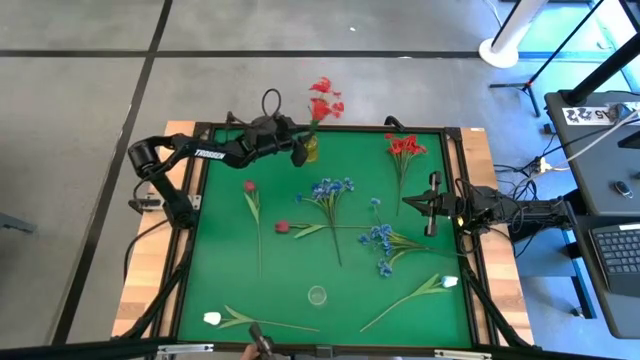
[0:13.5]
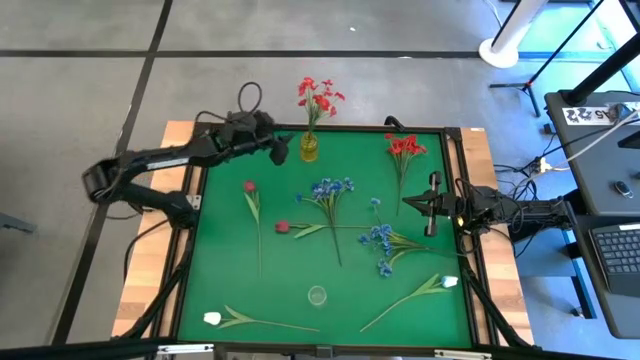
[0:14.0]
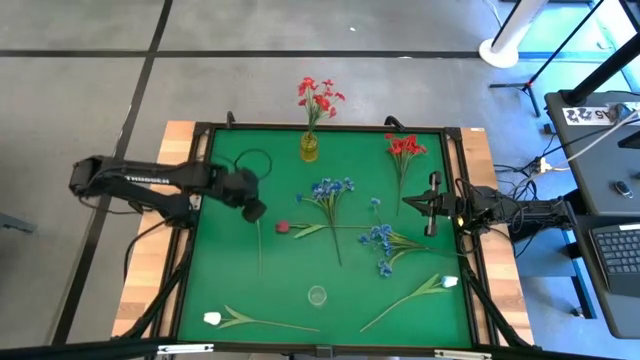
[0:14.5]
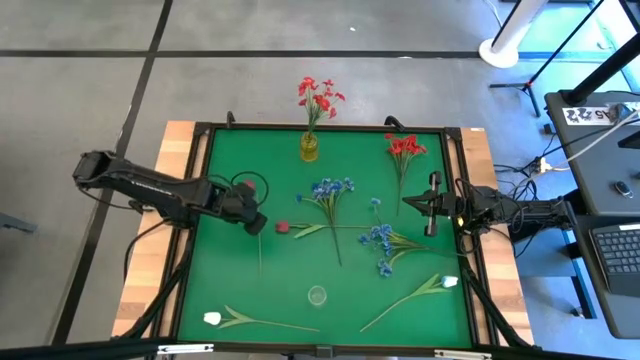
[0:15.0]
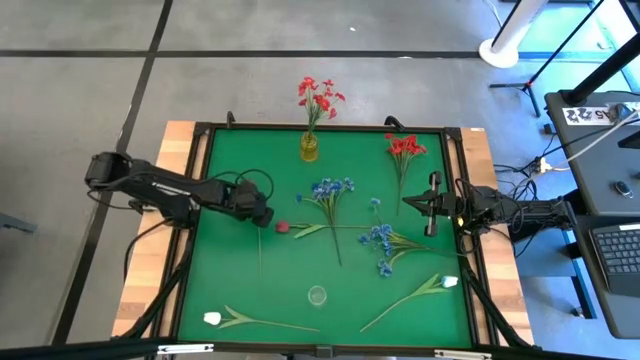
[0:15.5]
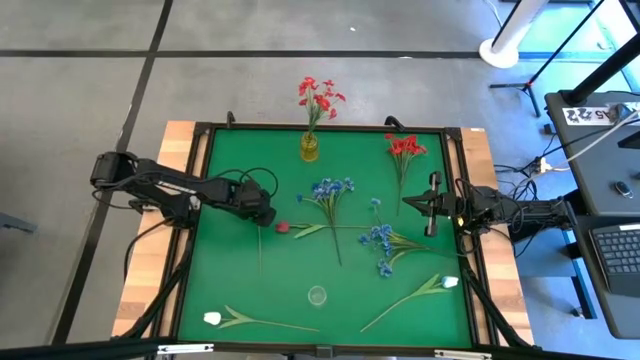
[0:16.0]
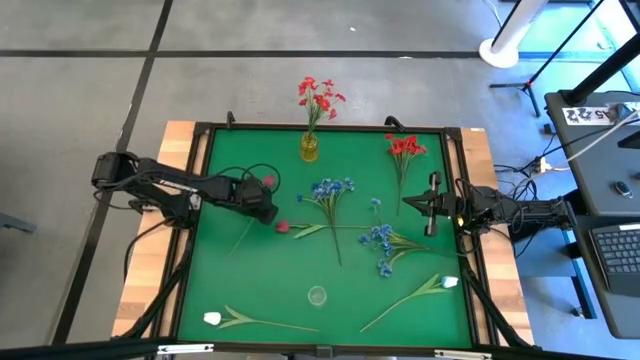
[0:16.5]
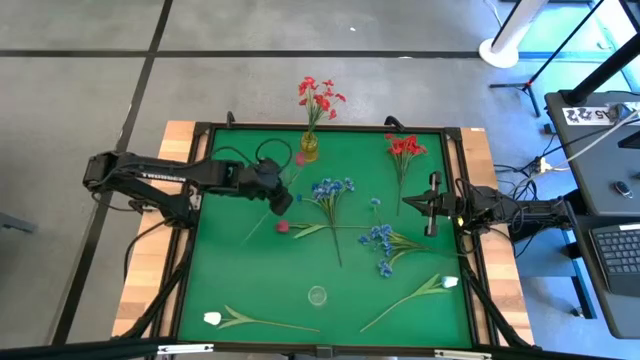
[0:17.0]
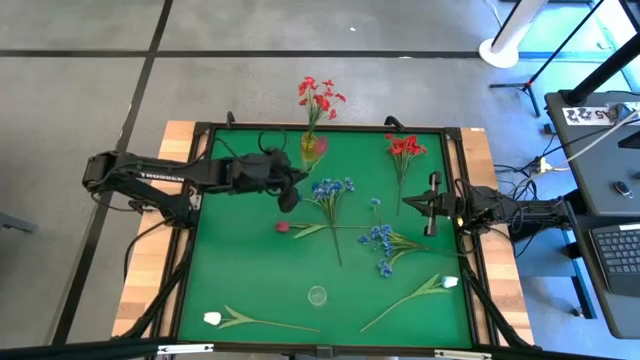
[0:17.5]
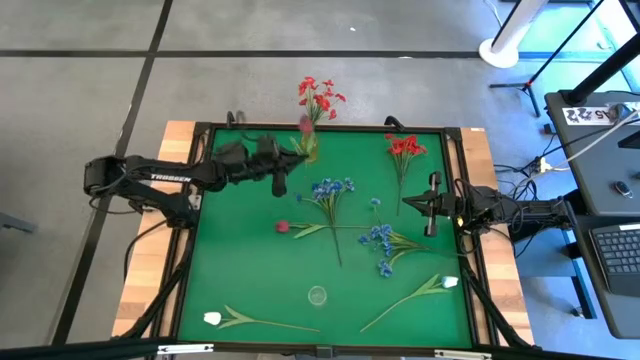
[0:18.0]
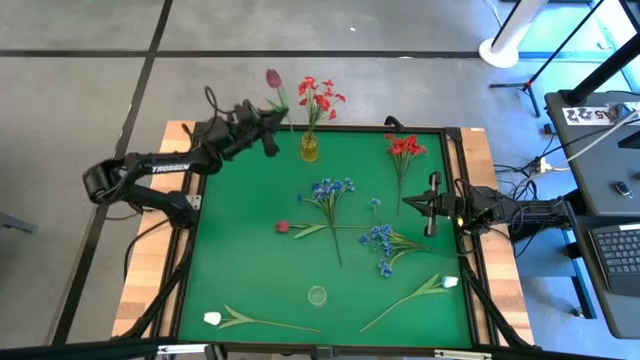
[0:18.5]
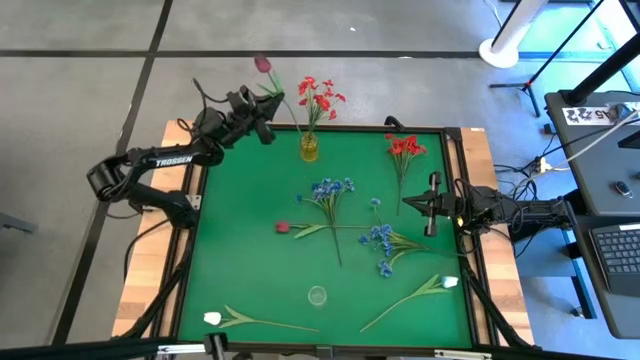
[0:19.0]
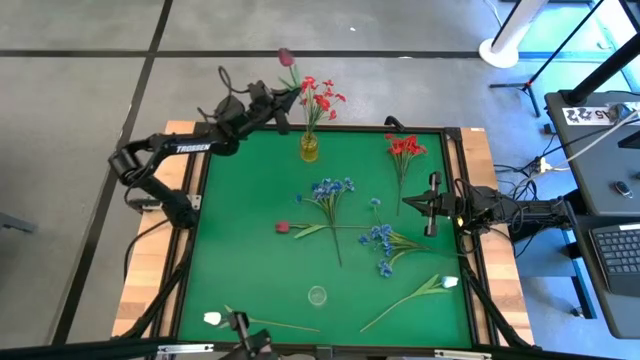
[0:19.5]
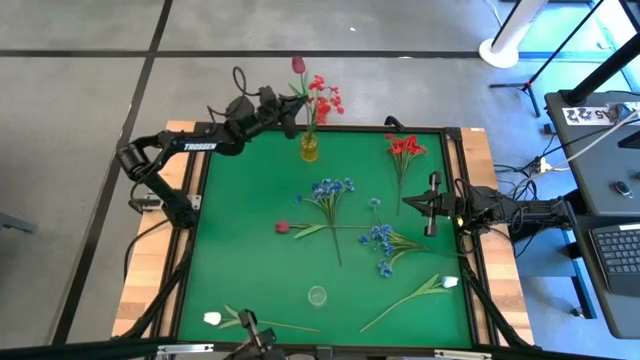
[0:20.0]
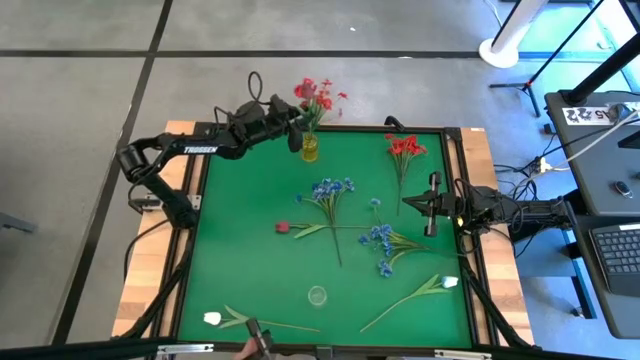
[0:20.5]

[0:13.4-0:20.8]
Task: Sort flowers into vase by color
Put the left red tulip into the yellow vase

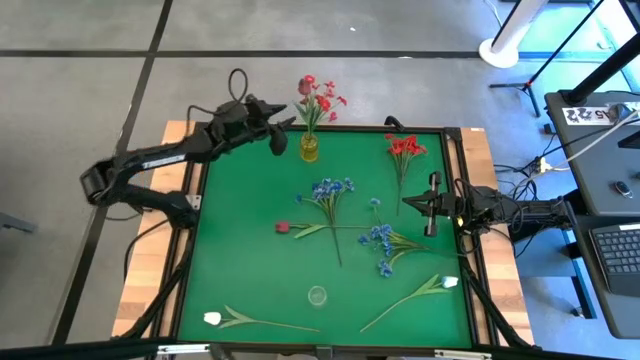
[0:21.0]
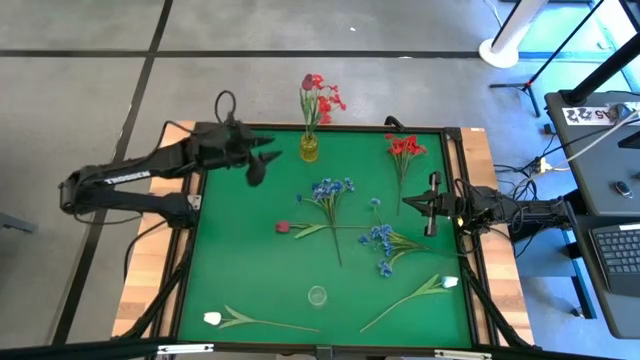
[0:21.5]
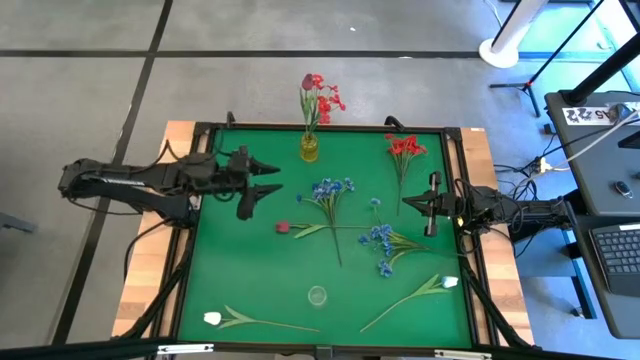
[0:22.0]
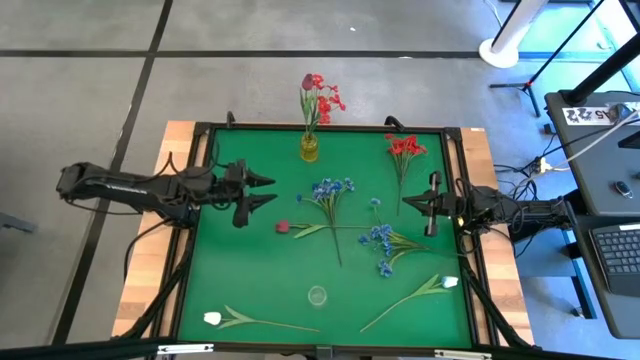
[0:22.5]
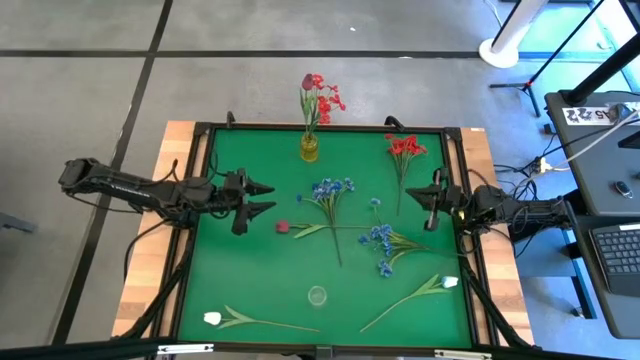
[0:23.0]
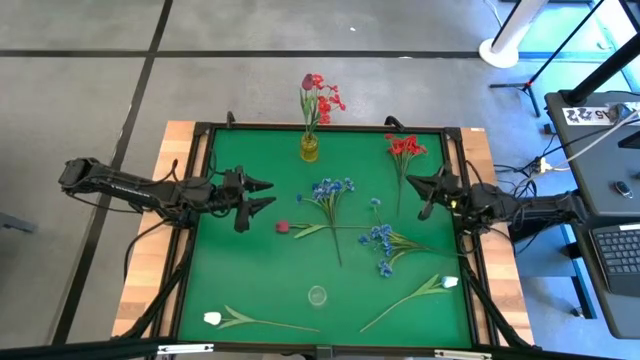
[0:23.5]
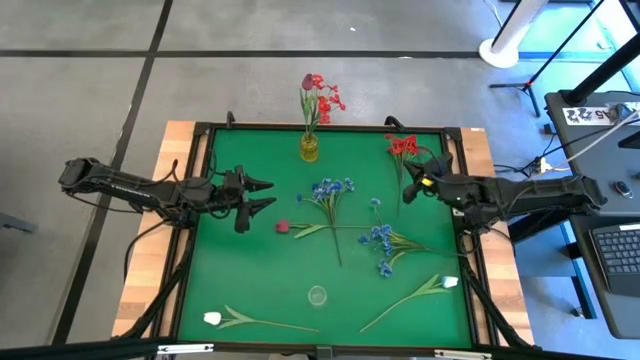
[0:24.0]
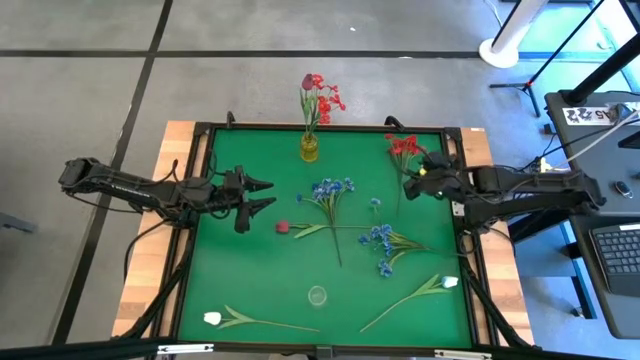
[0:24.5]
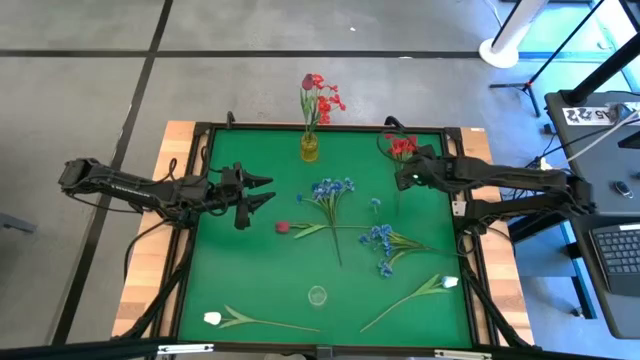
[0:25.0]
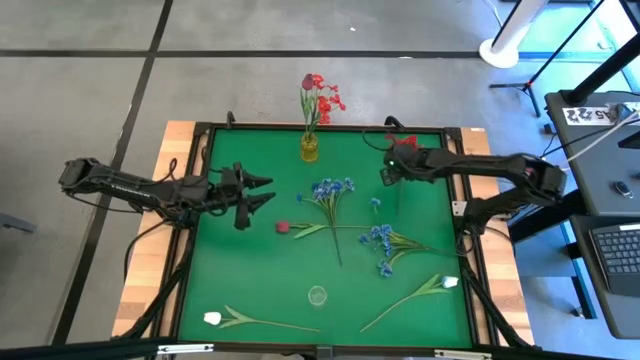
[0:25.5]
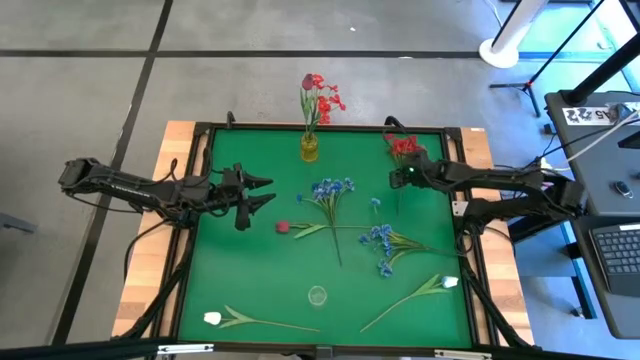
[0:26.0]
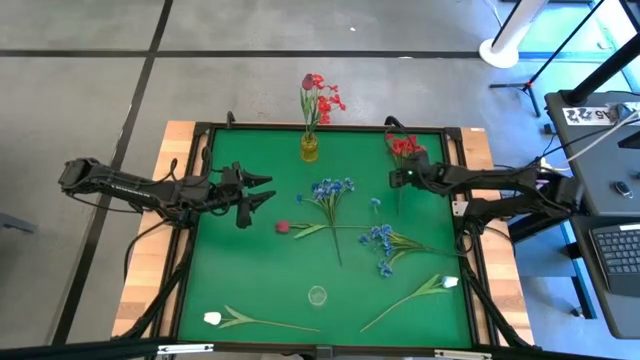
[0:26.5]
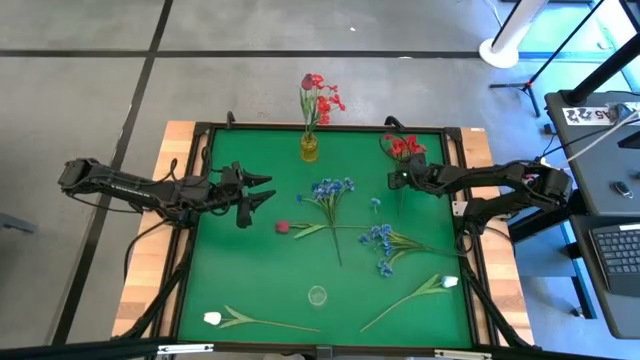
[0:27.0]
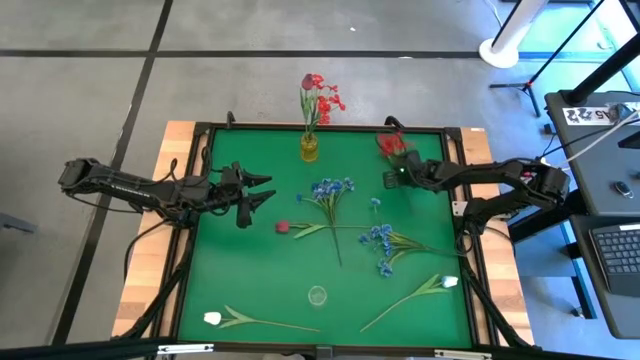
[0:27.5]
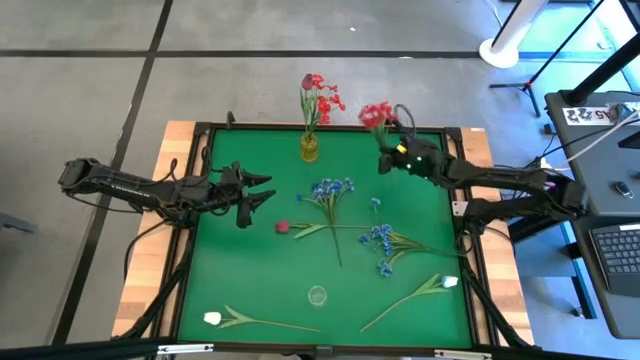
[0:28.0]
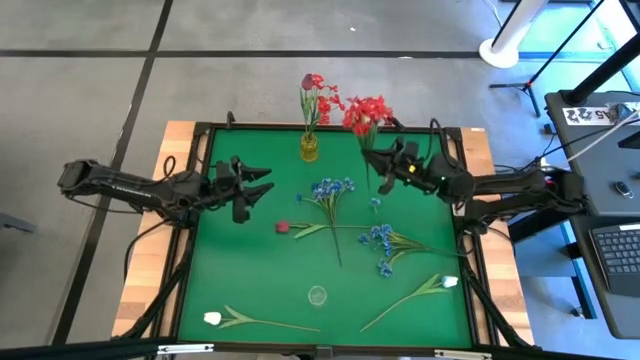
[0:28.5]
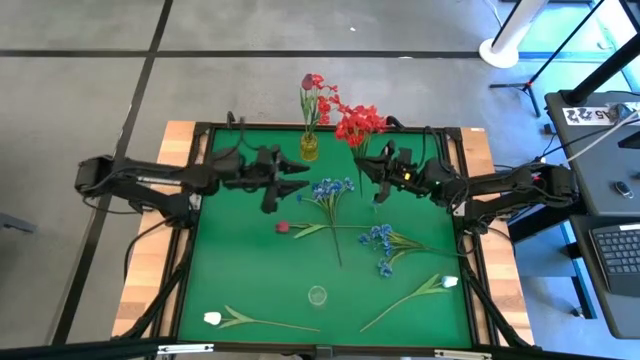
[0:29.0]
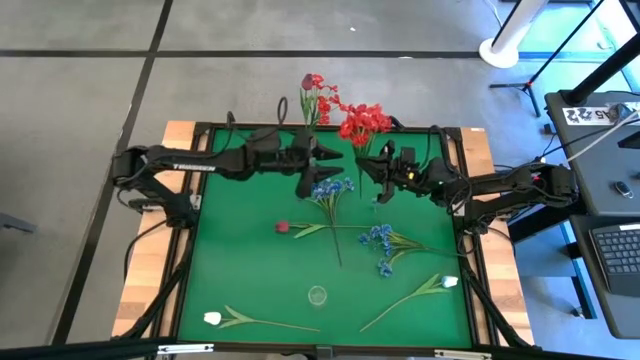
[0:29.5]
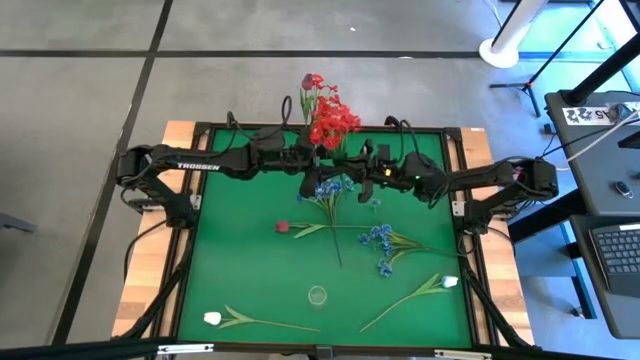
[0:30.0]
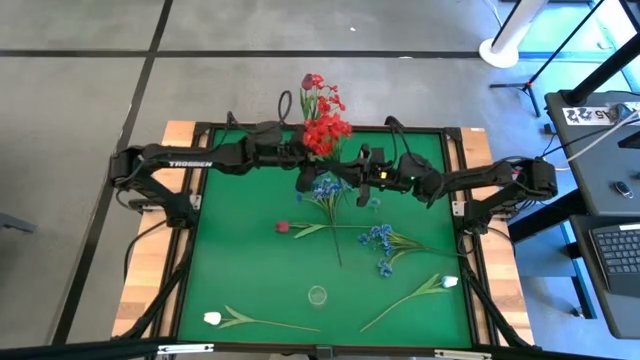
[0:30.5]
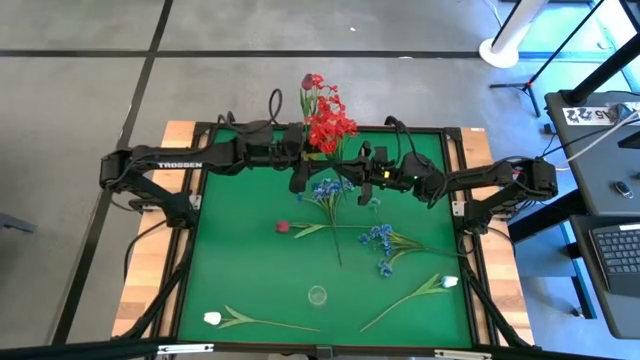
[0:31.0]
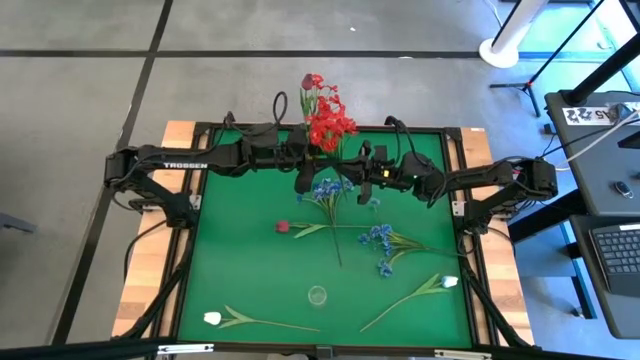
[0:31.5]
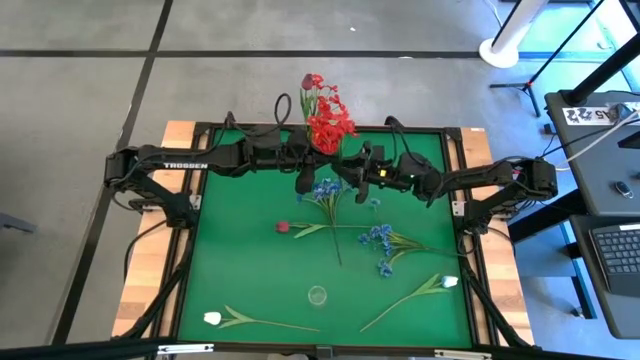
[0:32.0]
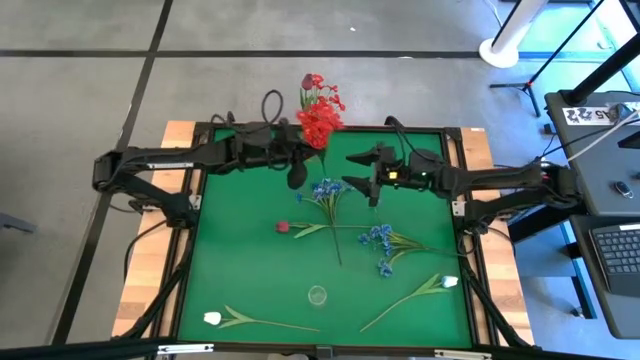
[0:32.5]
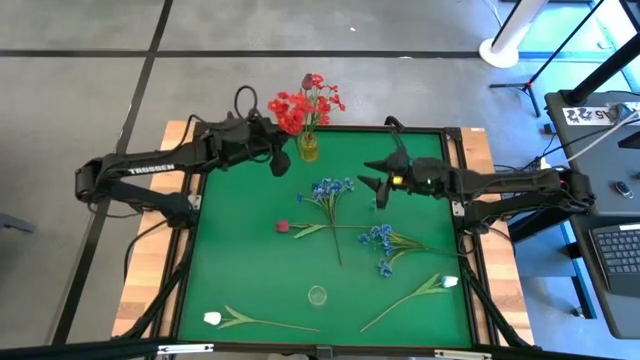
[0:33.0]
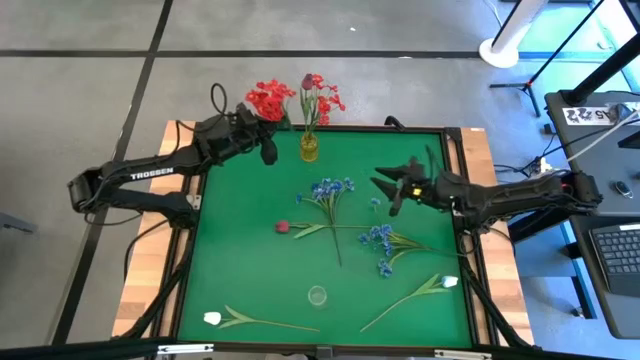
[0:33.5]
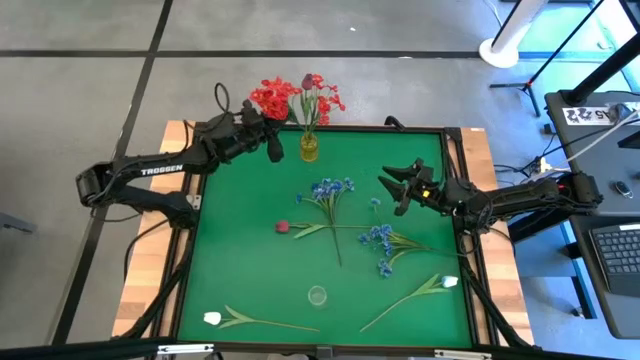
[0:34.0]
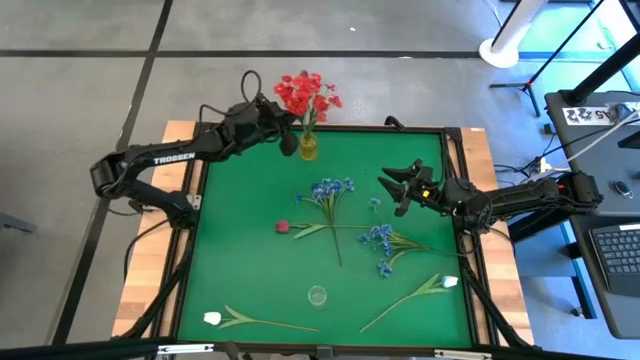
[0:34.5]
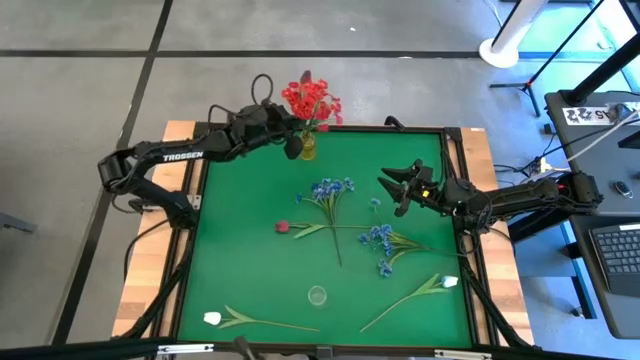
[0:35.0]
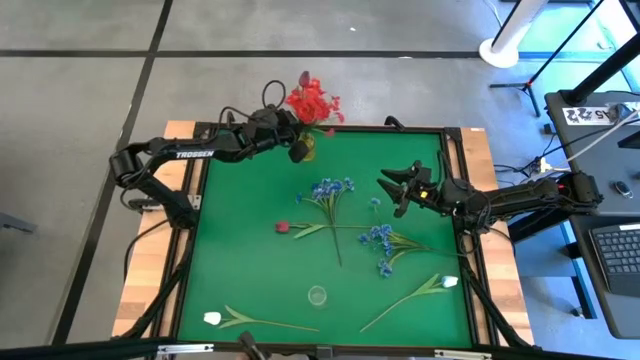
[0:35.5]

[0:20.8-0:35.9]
Put the red flowers into the yellow vase
